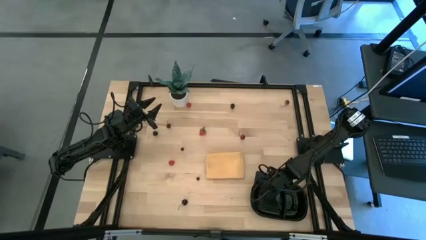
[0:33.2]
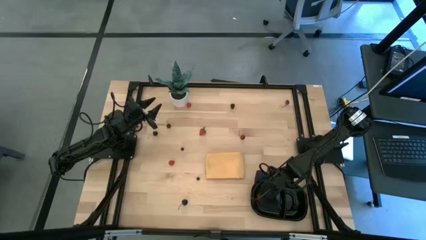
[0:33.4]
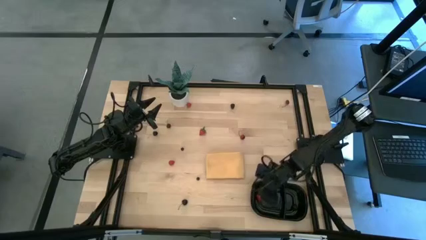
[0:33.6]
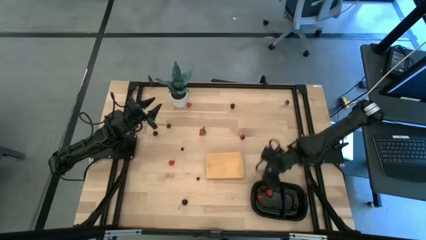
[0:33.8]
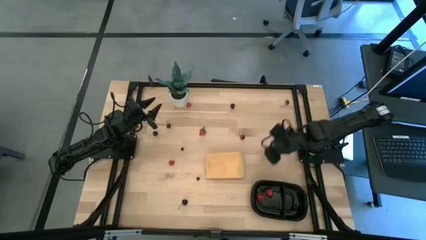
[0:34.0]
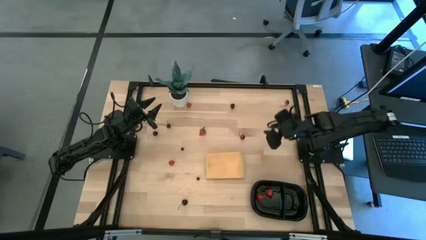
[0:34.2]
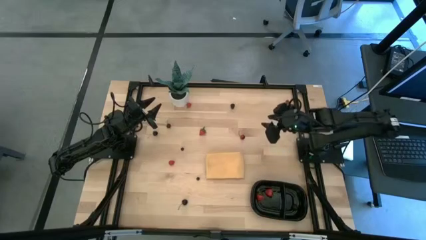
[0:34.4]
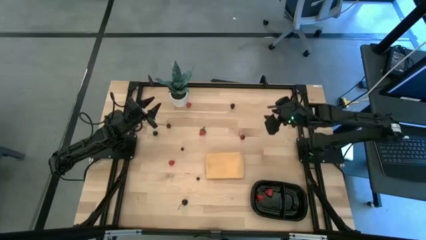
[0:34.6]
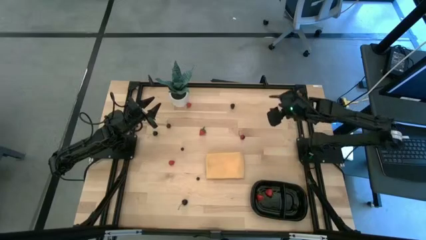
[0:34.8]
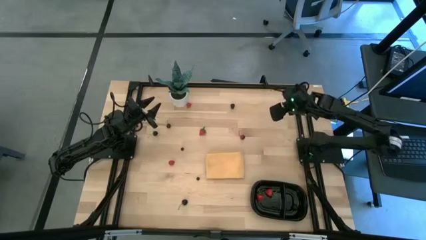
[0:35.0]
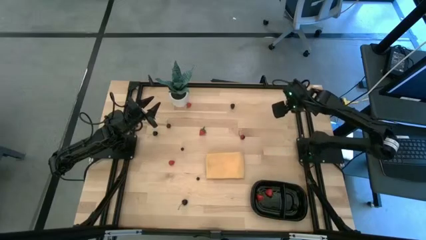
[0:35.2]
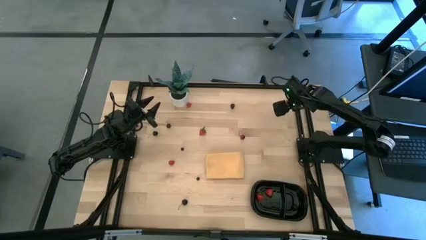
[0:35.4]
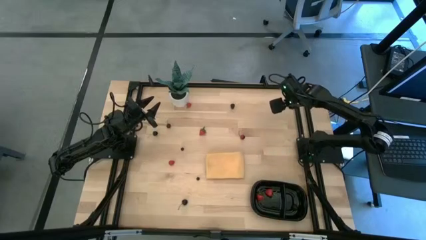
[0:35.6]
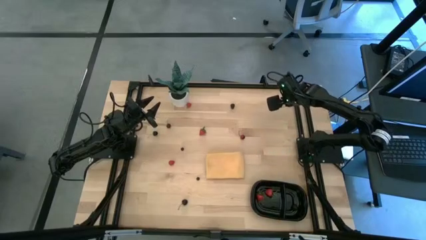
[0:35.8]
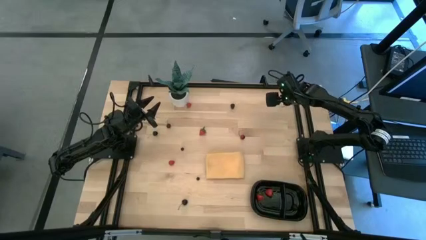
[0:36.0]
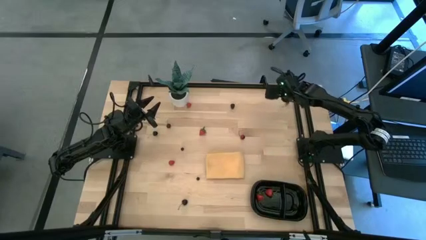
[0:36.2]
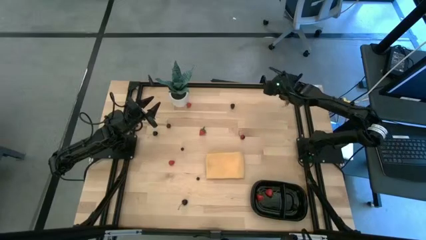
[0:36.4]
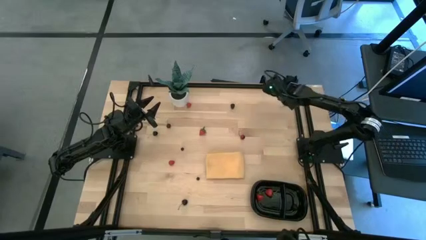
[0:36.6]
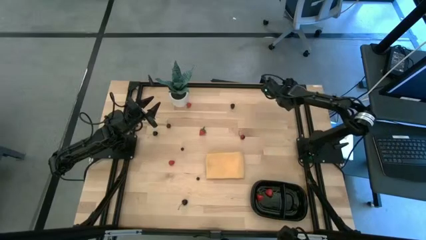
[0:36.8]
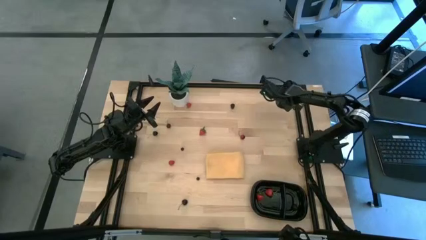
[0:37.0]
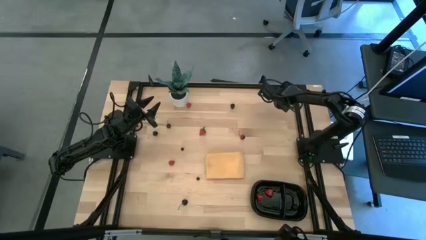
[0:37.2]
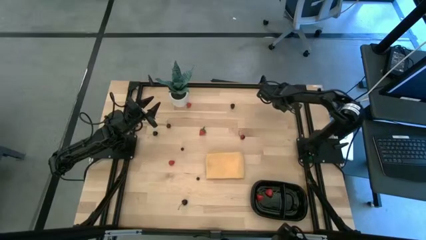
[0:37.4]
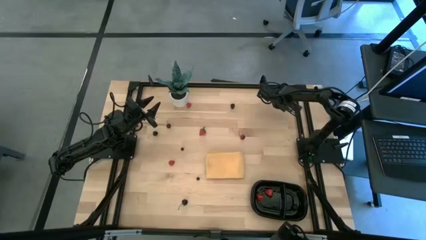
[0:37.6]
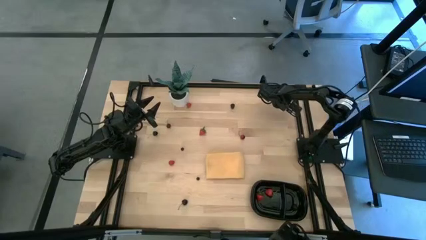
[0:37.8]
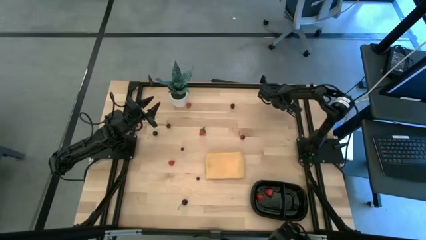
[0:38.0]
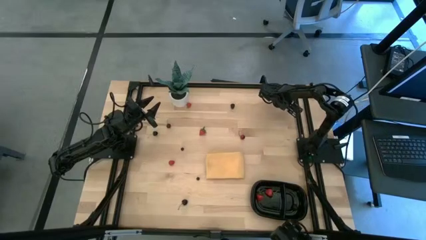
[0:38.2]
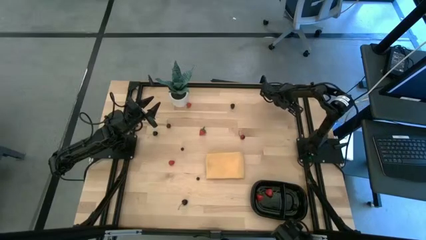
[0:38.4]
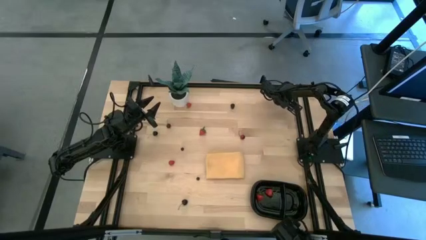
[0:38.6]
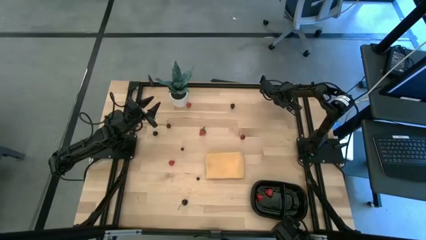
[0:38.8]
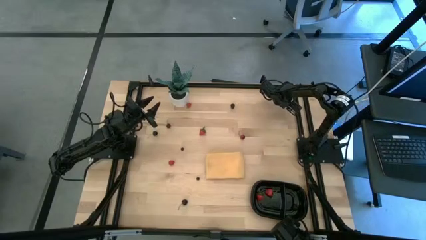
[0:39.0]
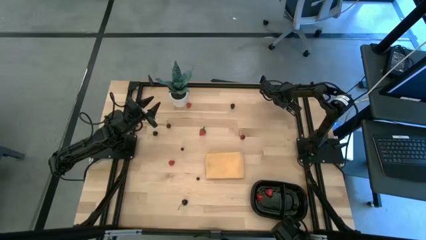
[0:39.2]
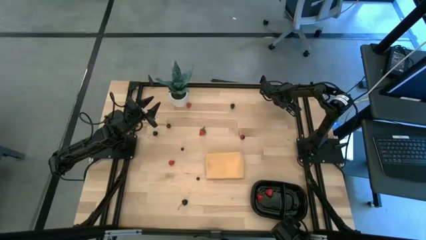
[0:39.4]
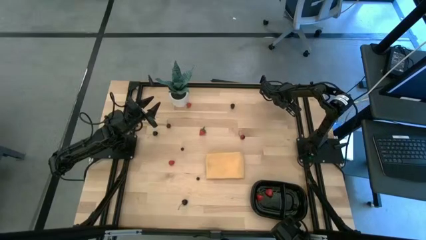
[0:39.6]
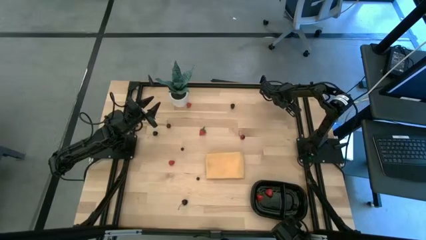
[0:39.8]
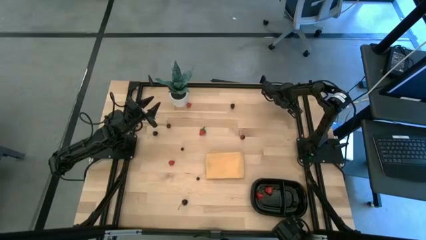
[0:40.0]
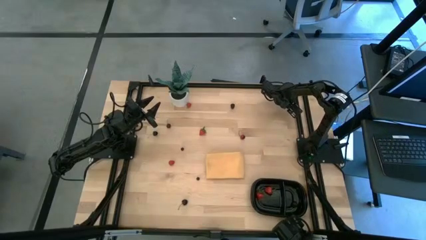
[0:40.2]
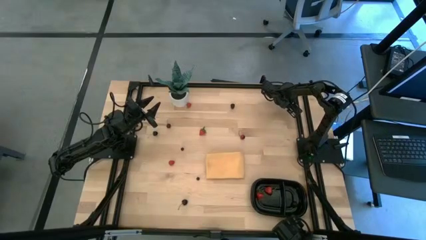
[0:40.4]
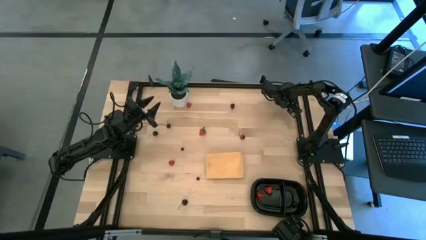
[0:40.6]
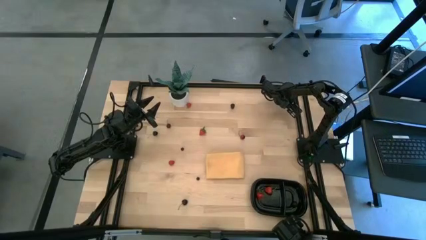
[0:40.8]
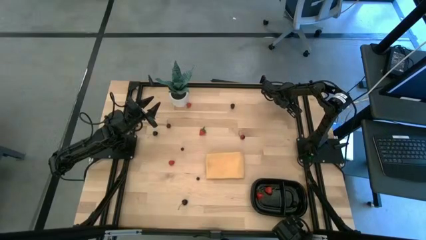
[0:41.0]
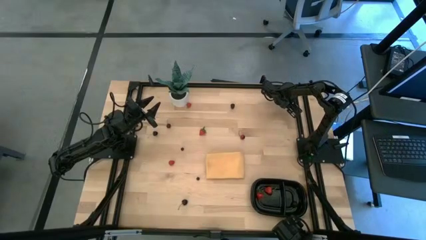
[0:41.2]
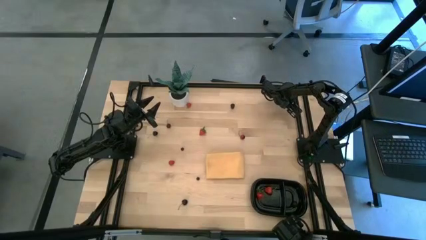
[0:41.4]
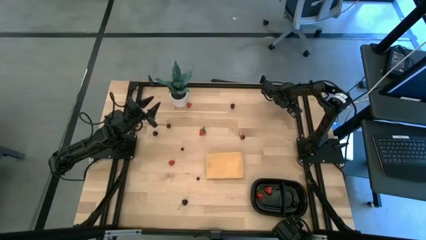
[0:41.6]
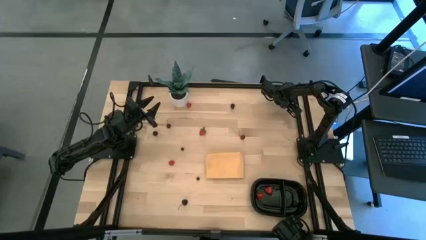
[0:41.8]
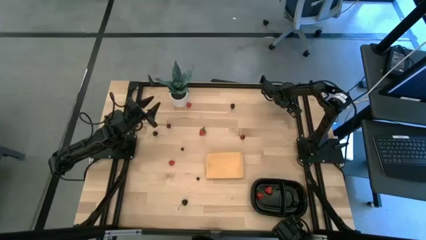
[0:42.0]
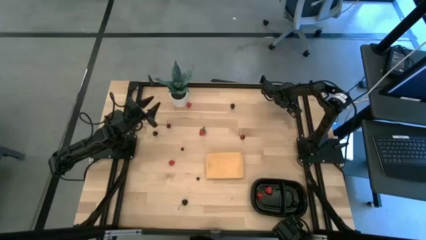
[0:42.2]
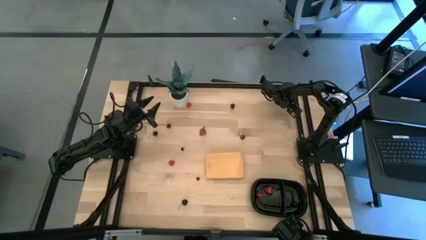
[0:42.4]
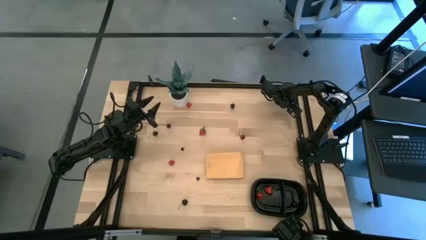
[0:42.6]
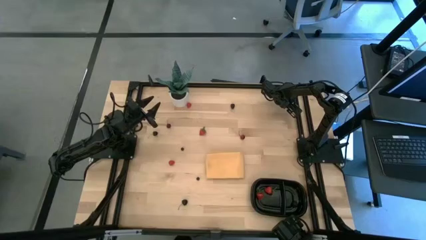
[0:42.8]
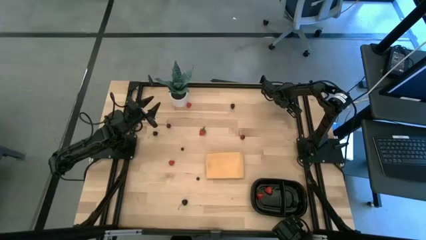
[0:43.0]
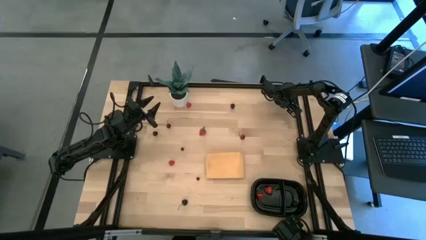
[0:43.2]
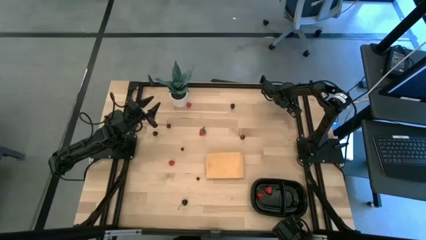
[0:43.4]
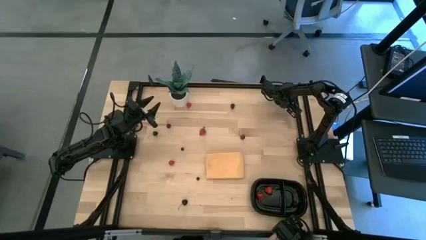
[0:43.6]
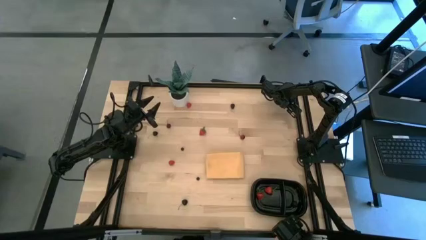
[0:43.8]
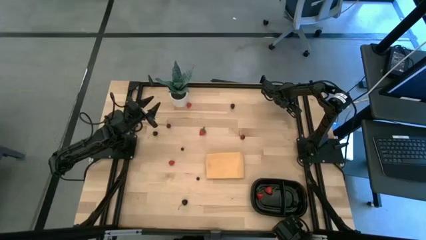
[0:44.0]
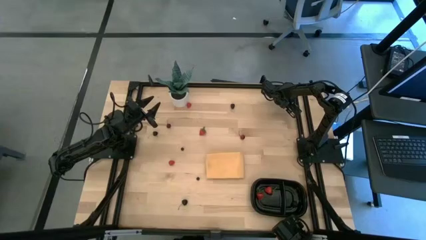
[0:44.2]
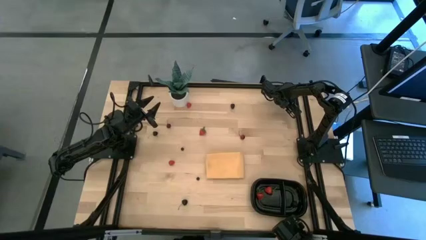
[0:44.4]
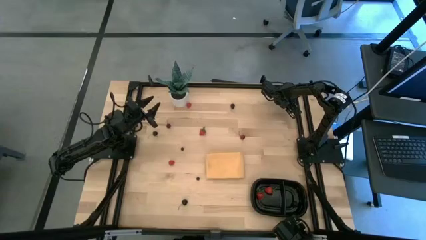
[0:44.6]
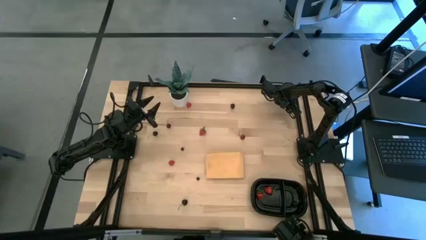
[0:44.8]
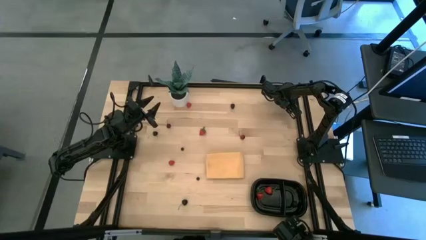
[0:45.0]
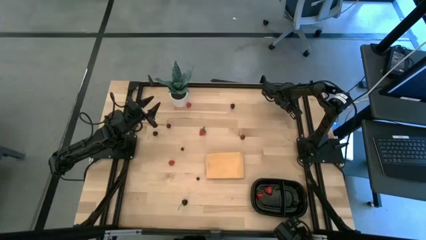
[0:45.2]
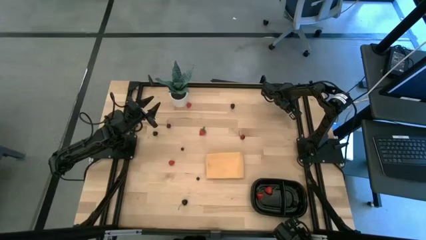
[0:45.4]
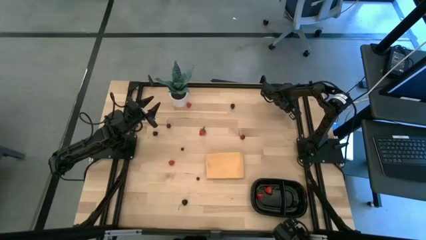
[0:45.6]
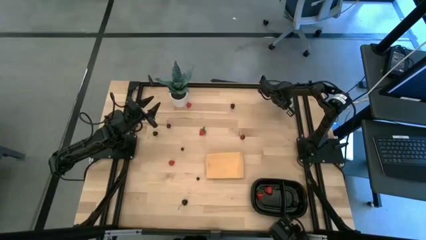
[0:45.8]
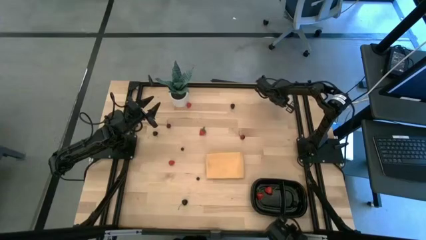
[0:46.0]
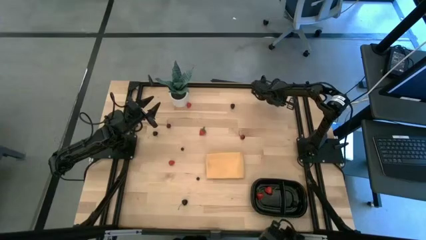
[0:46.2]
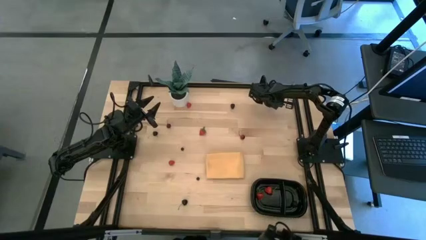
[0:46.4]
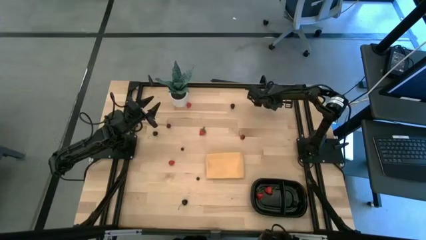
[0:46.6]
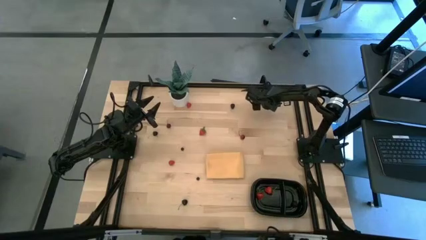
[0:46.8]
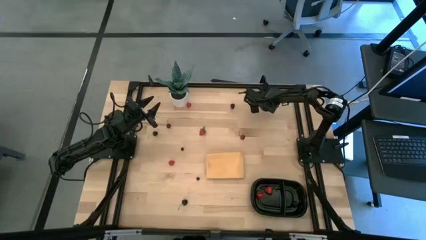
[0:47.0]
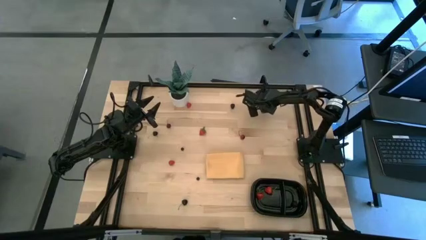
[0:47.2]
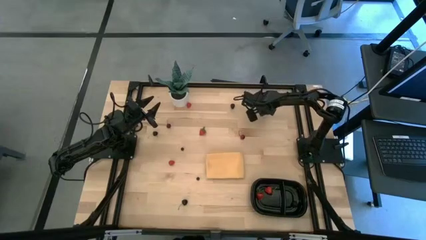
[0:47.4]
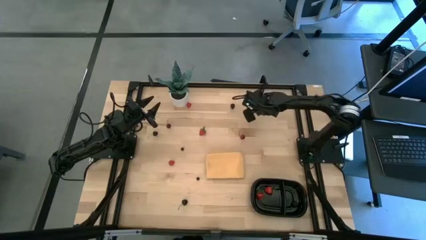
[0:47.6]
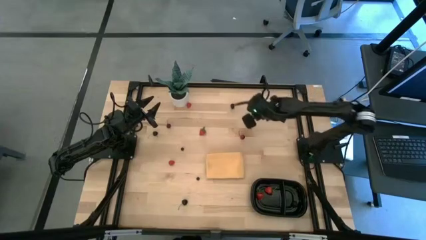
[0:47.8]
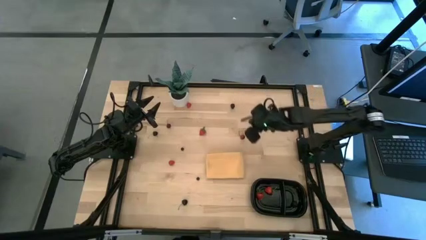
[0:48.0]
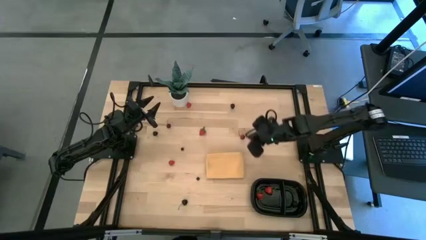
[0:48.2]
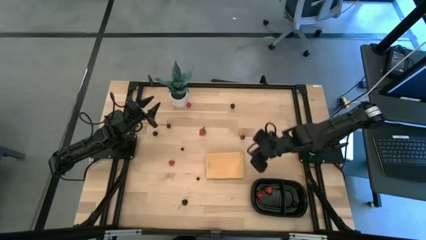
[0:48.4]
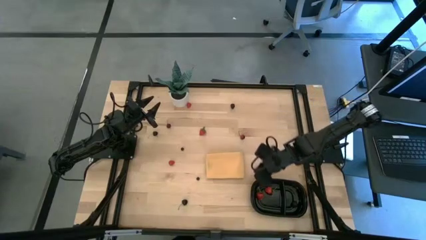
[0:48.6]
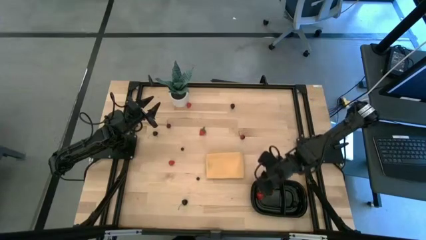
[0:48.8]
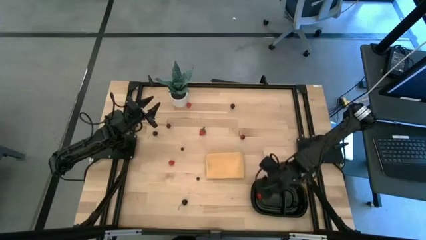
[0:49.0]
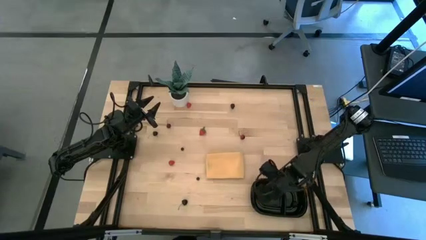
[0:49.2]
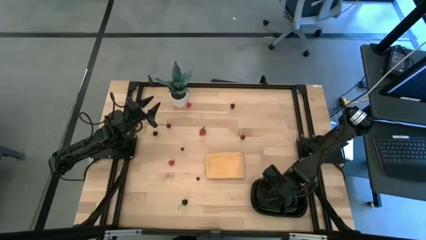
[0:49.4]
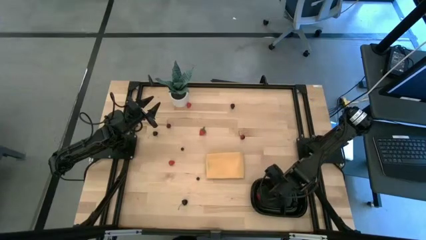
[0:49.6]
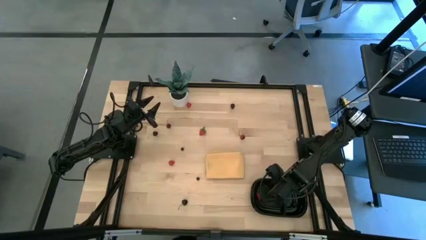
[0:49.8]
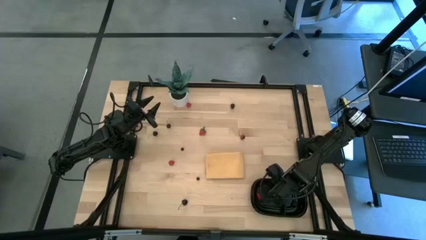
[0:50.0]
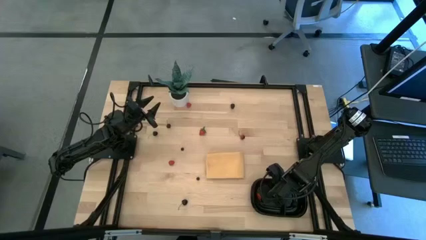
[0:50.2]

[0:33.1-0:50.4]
Task: Pick and placing Produce into tupperware
Put the top red cherry into the black container
